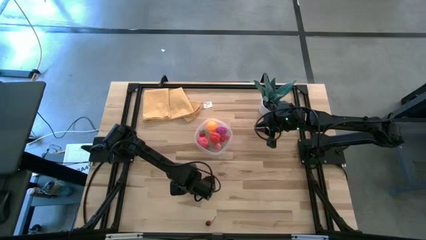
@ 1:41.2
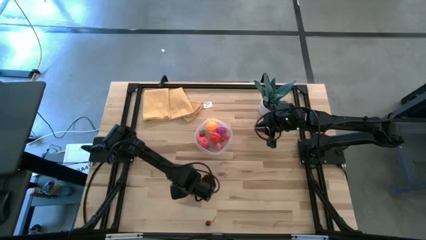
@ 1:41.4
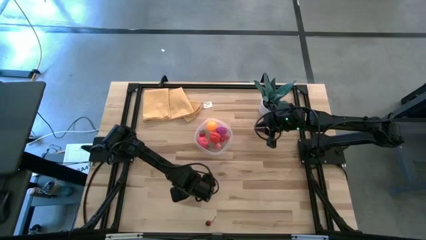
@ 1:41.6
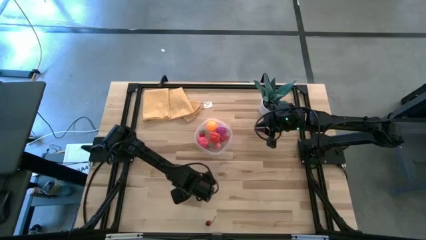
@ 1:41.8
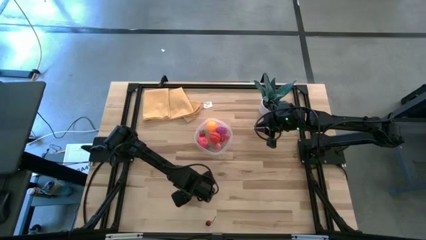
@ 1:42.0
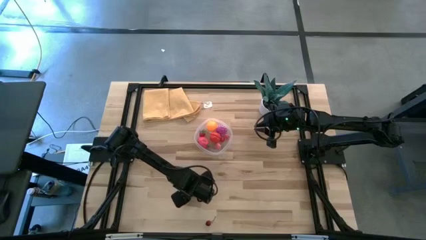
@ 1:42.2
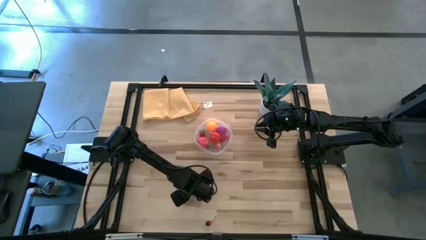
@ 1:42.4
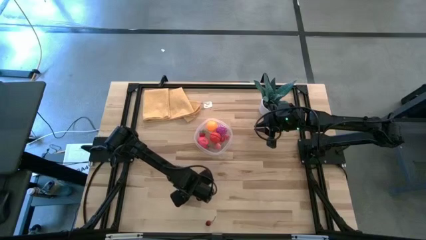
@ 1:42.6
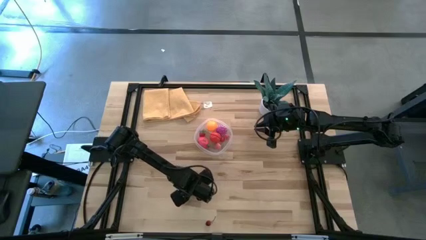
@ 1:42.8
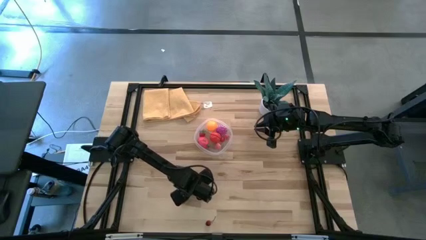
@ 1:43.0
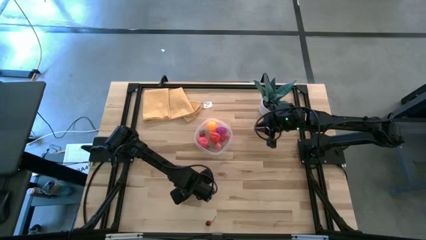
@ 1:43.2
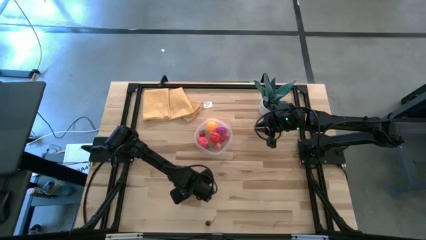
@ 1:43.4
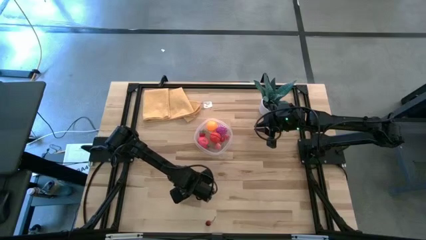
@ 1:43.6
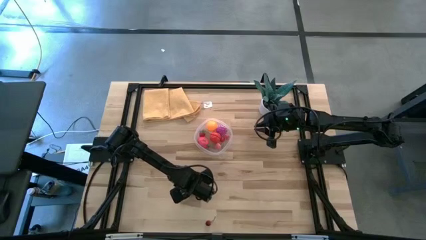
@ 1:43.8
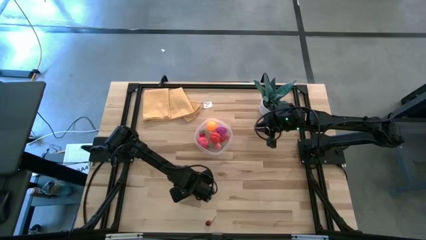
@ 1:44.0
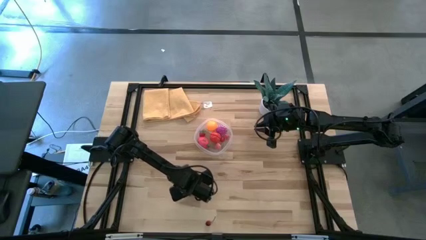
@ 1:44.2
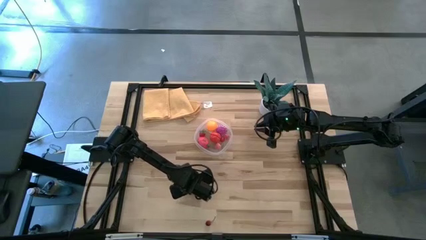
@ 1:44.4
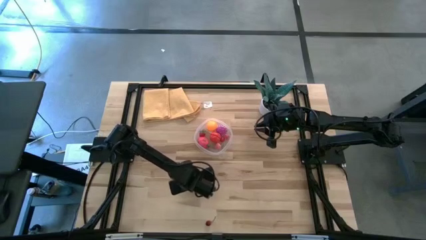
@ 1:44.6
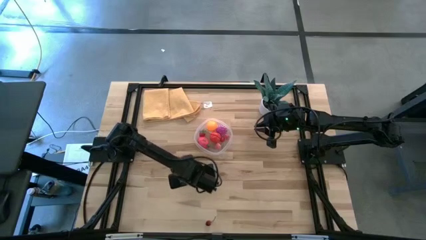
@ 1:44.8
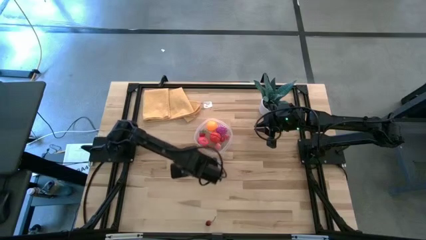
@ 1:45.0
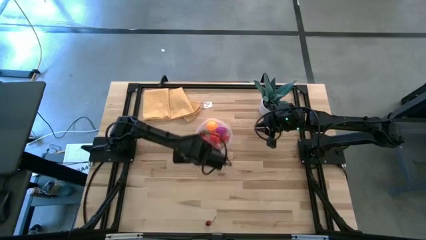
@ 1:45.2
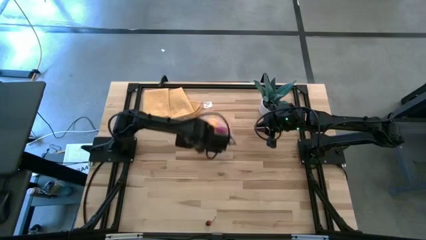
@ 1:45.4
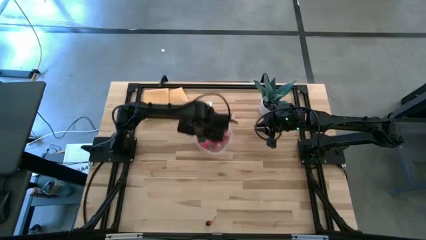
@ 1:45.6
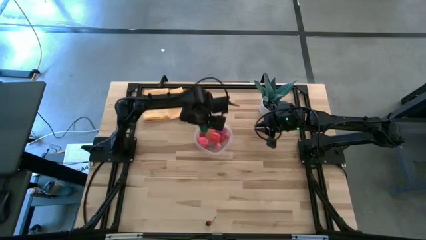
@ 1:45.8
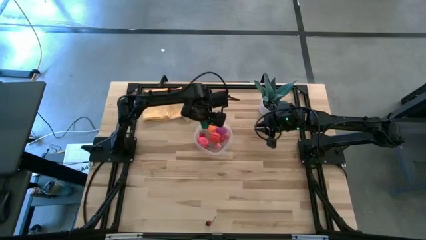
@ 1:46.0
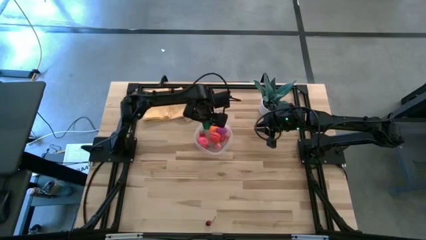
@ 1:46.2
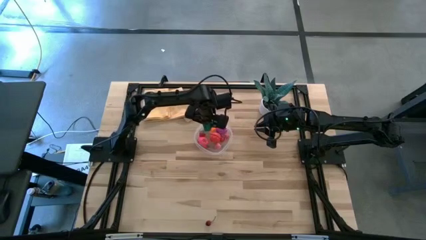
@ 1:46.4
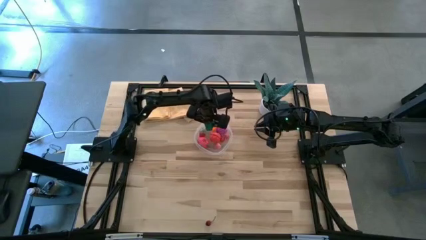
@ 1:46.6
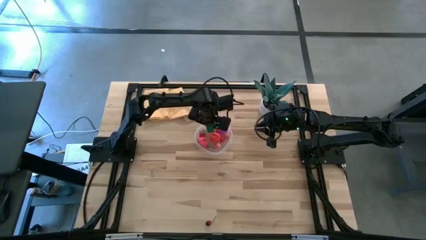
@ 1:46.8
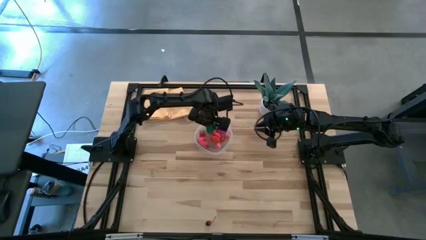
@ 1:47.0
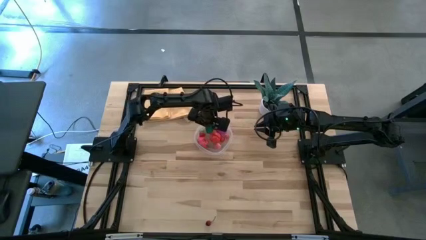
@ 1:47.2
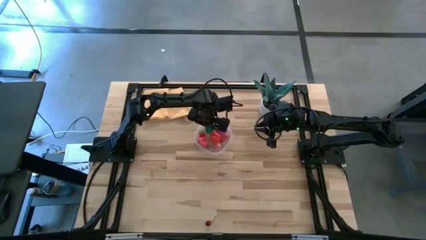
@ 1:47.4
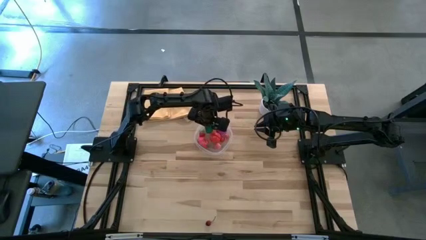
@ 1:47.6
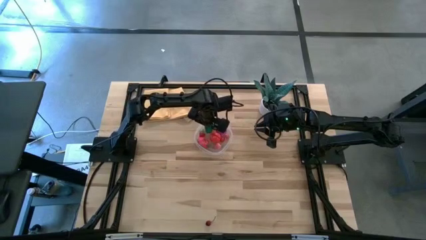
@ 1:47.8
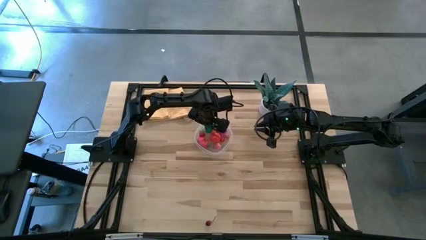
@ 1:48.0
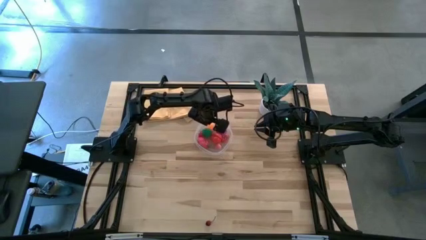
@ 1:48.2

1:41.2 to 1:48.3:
Task: Pick and placing Produce into tupperware
Put the bell pepper into the transparent bin

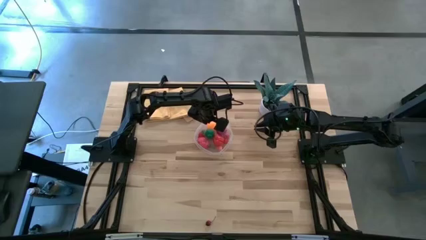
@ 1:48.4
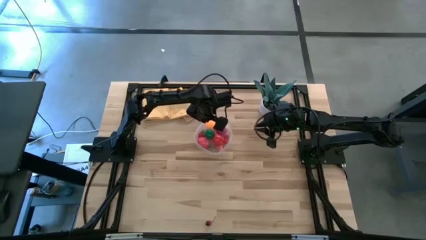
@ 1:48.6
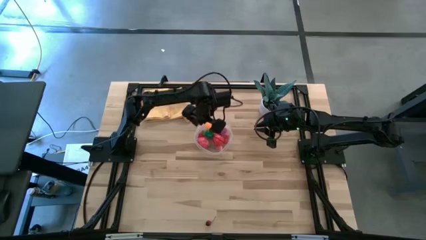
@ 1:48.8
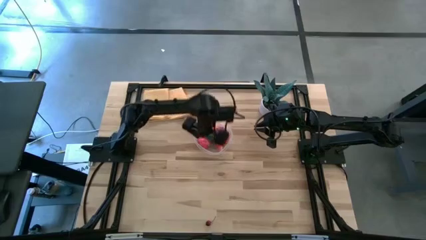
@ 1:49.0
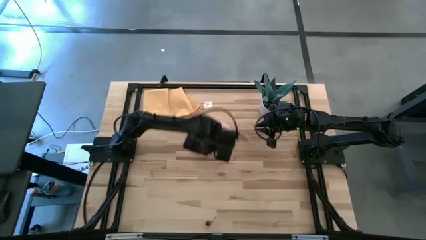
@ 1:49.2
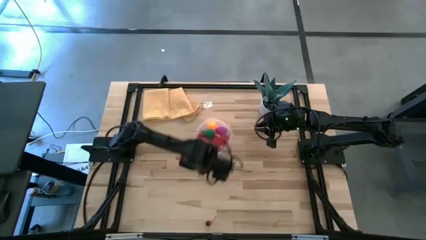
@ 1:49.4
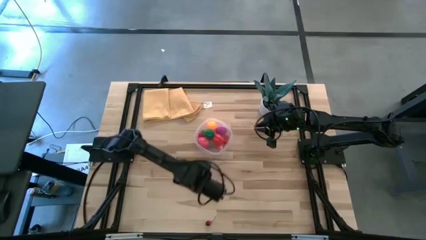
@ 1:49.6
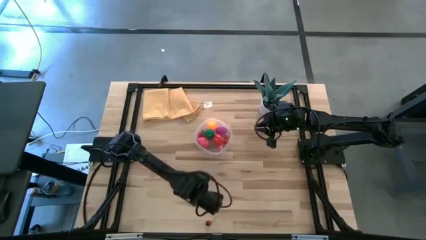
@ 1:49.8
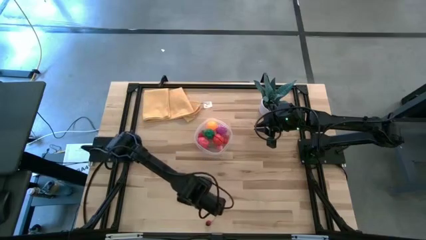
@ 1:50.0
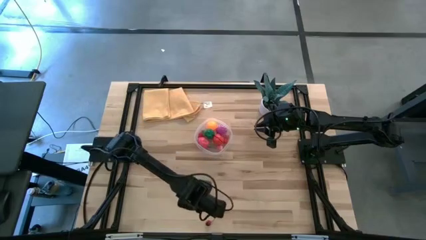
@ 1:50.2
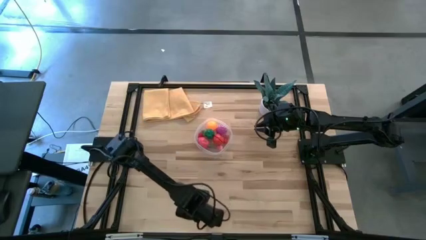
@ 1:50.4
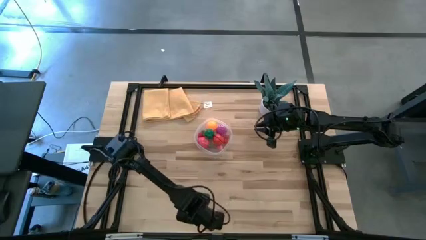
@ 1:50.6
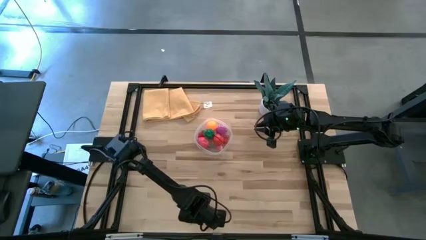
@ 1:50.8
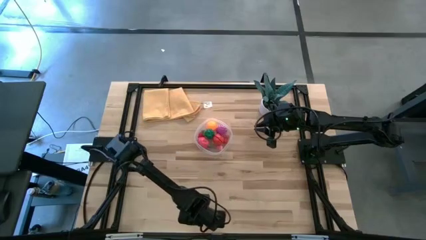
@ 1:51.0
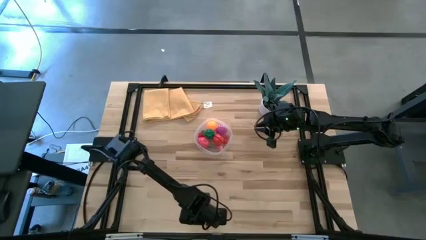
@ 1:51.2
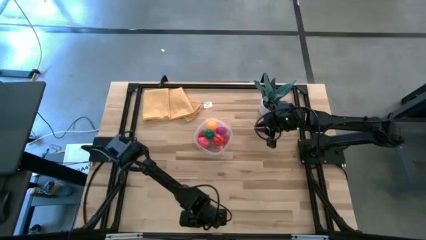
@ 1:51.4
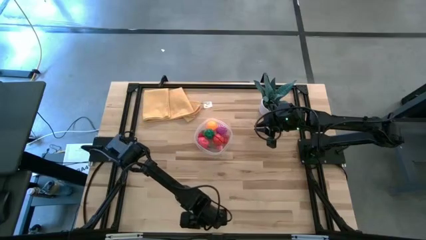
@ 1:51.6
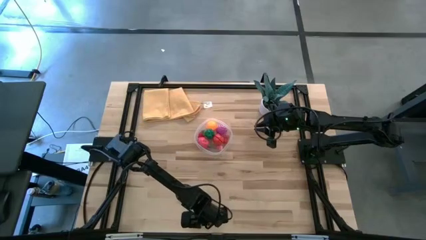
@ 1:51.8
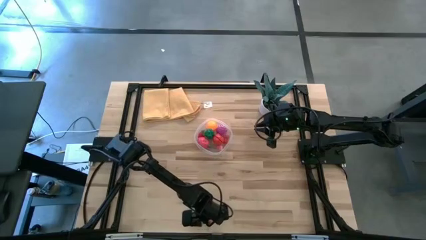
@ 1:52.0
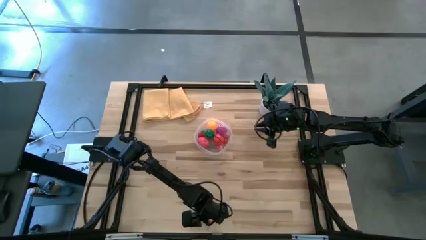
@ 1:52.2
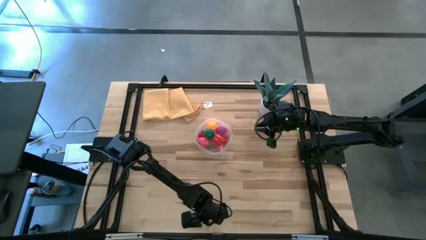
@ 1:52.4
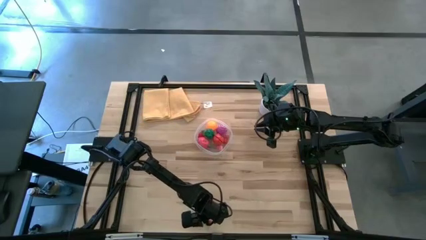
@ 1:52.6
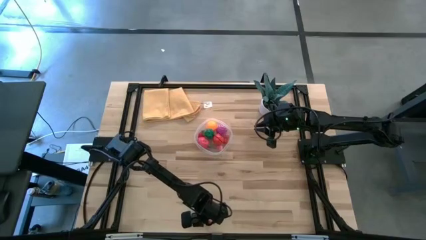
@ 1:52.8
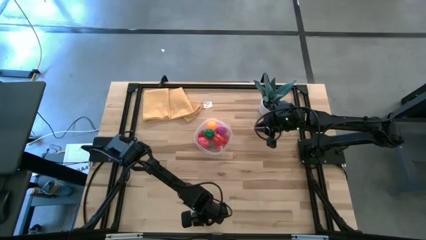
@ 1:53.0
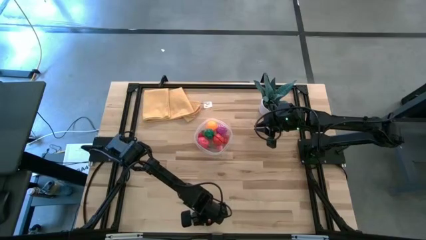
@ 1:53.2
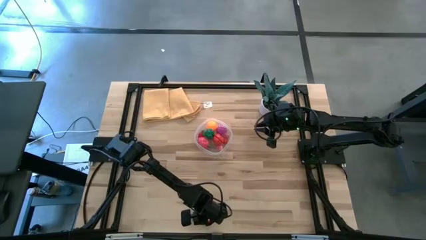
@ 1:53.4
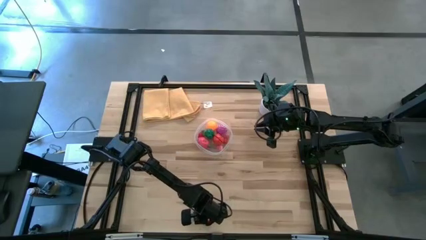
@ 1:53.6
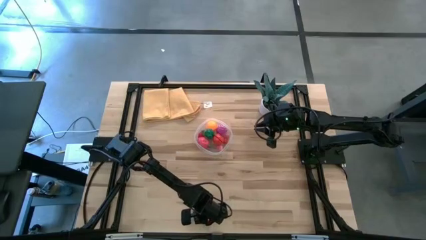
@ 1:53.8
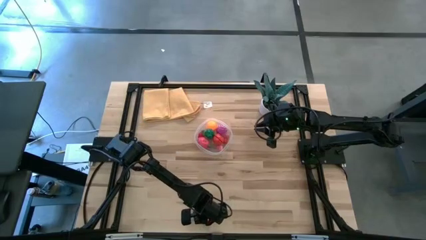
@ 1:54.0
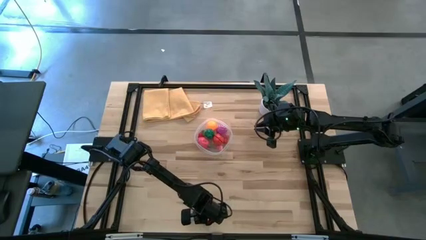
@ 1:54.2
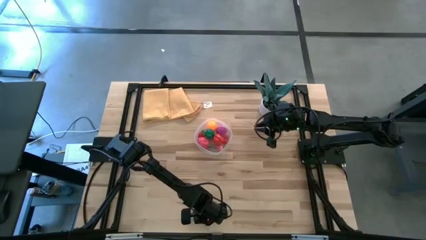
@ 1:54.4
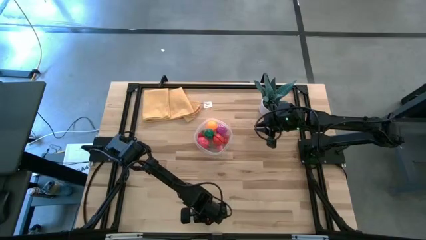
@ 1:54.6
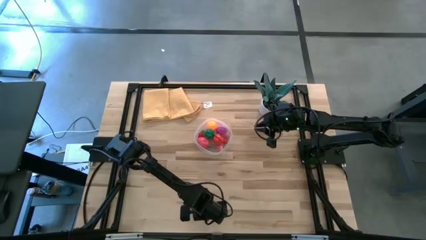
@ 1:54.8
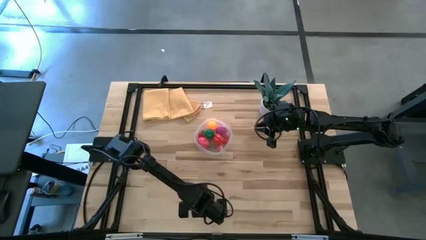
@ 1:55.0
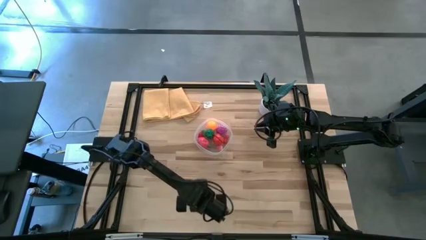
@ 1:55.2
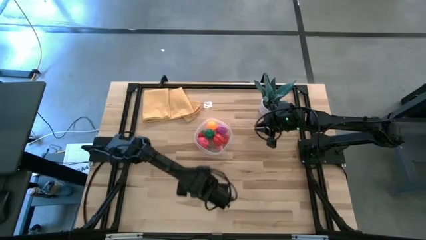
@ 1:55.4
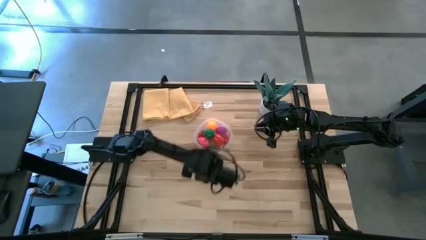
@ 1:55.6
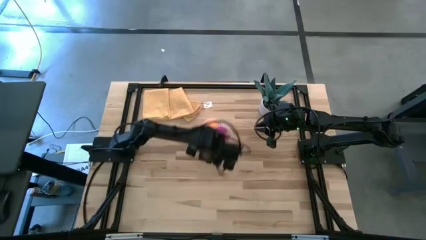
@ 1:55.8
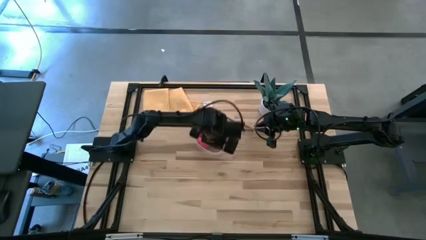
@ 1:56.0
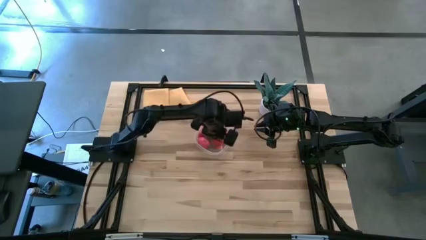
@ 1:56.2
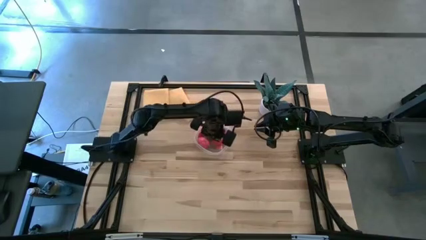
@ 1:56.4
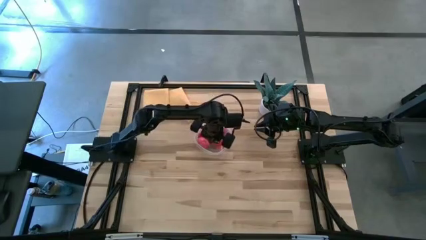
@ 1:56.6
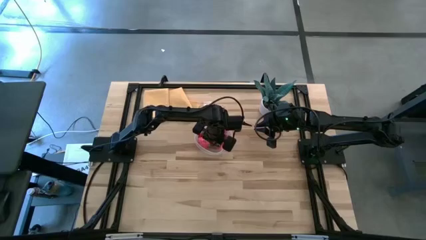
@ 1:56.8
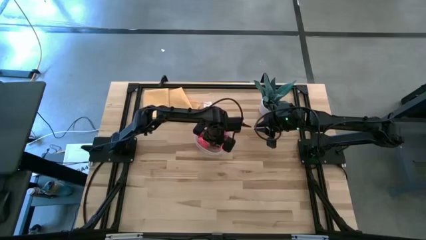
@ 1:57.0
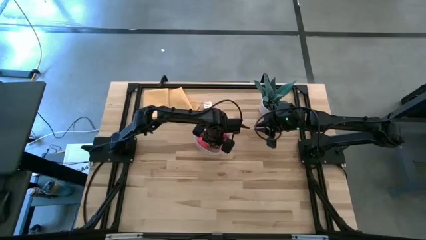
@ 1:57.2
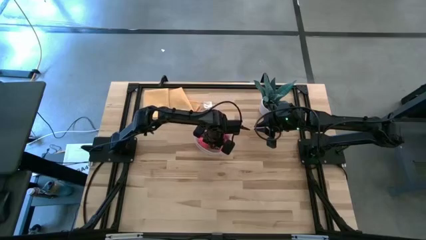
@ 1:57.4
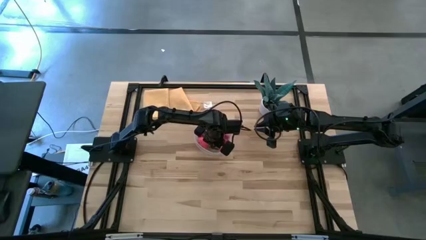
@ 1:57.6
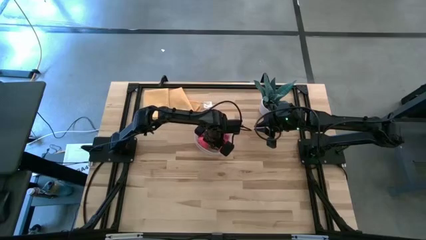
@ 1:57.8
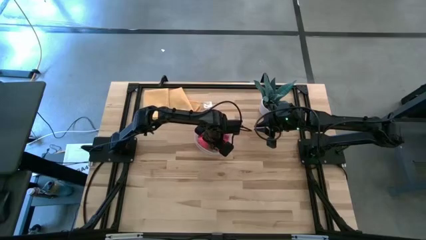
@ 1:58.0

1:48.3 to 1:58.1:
Put the cherry into the transparent bin
